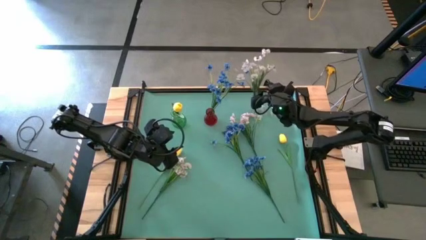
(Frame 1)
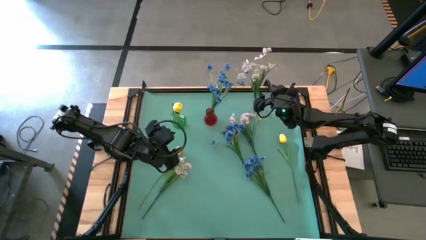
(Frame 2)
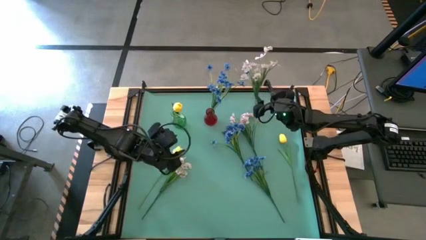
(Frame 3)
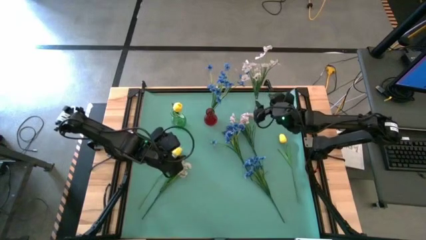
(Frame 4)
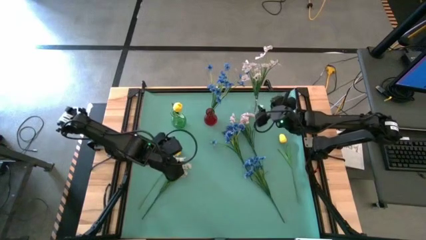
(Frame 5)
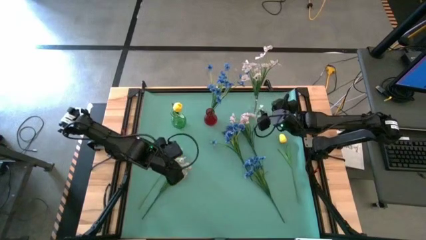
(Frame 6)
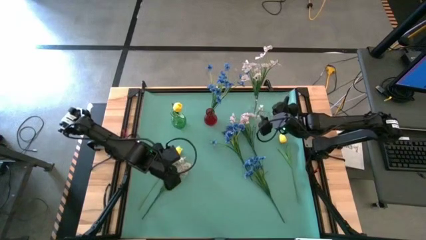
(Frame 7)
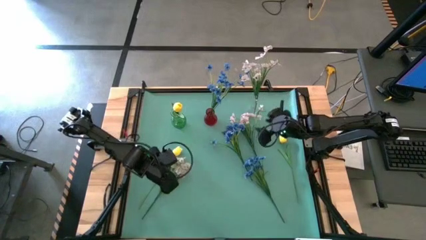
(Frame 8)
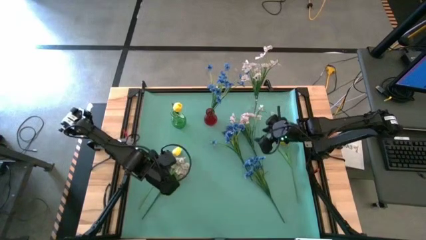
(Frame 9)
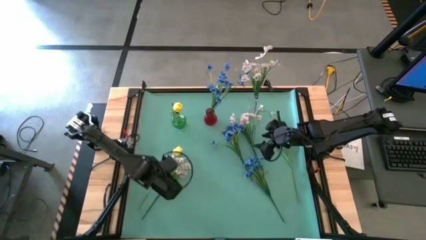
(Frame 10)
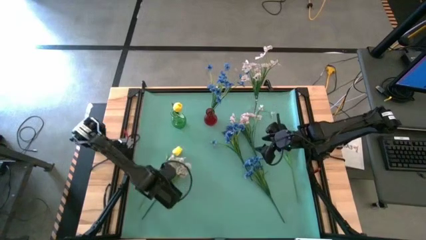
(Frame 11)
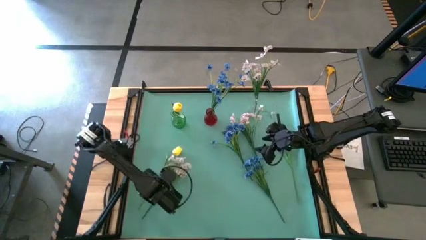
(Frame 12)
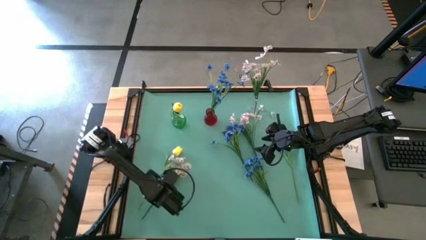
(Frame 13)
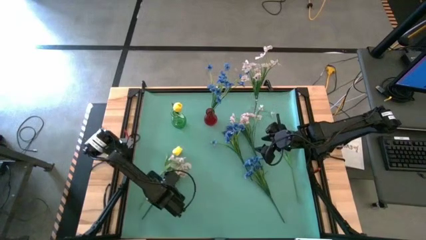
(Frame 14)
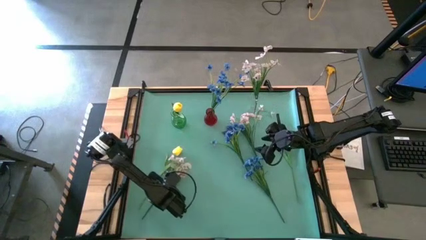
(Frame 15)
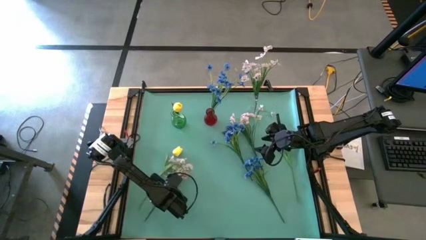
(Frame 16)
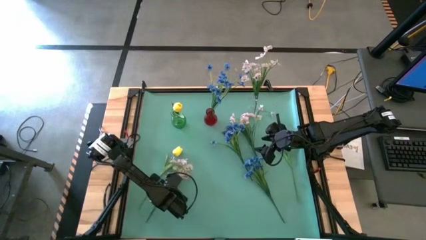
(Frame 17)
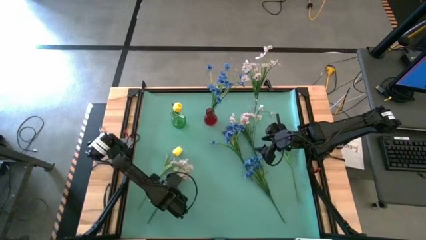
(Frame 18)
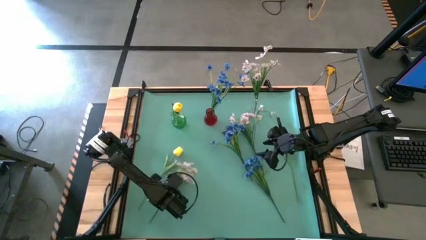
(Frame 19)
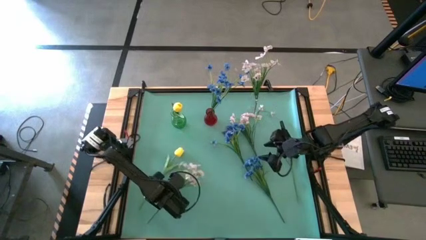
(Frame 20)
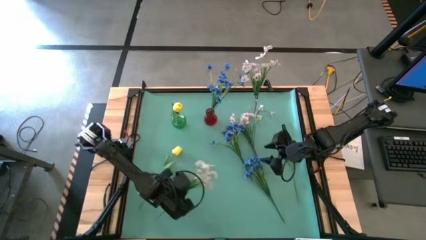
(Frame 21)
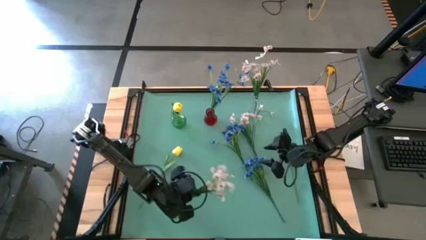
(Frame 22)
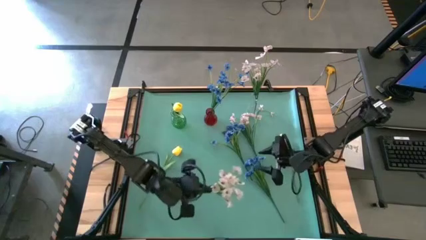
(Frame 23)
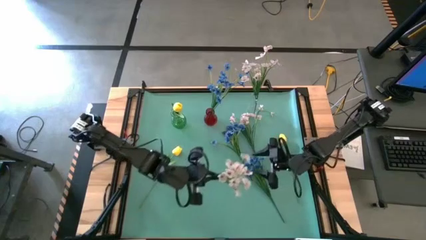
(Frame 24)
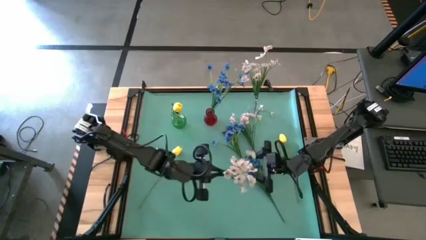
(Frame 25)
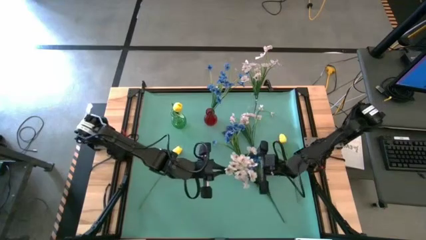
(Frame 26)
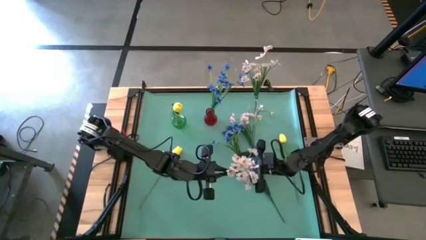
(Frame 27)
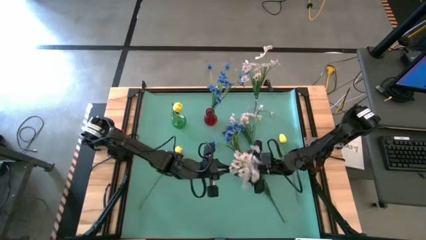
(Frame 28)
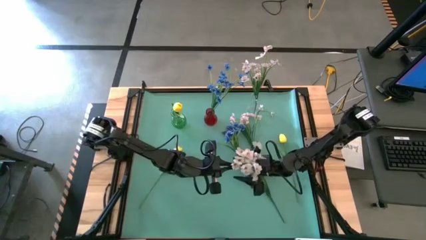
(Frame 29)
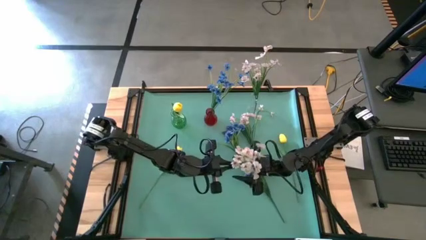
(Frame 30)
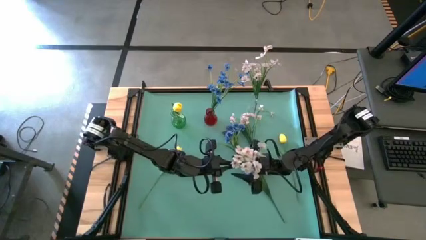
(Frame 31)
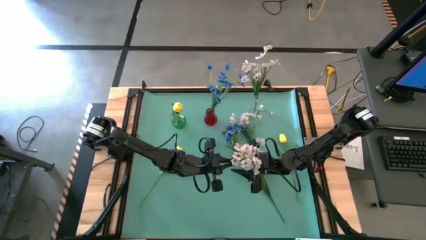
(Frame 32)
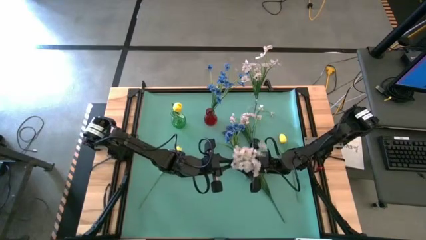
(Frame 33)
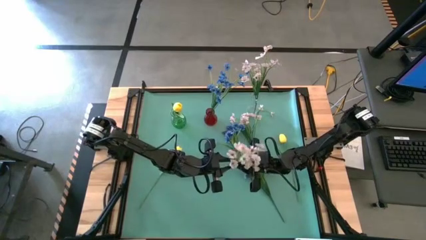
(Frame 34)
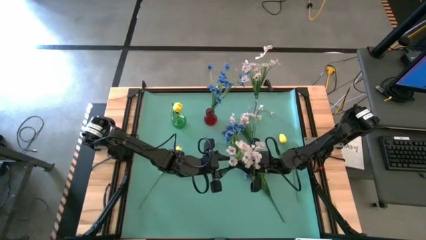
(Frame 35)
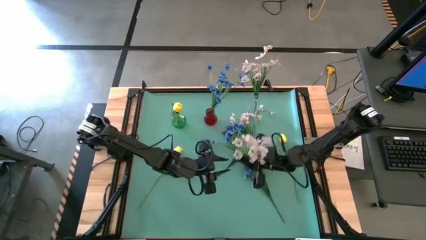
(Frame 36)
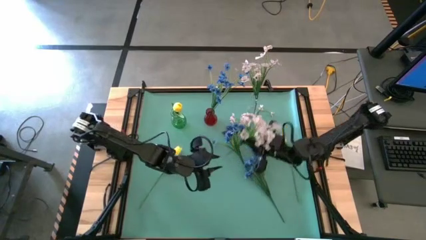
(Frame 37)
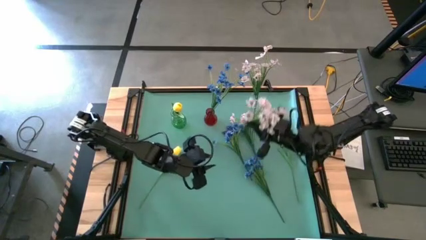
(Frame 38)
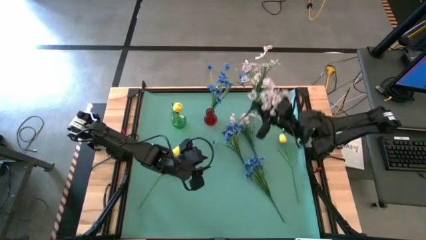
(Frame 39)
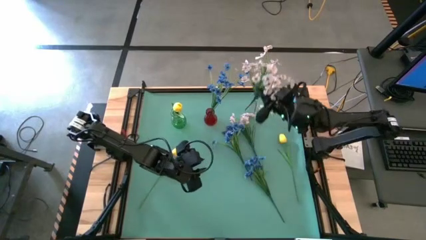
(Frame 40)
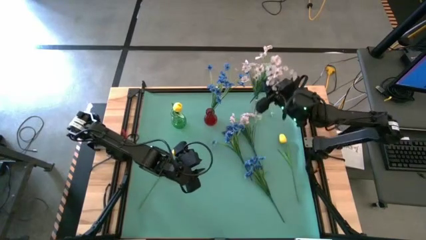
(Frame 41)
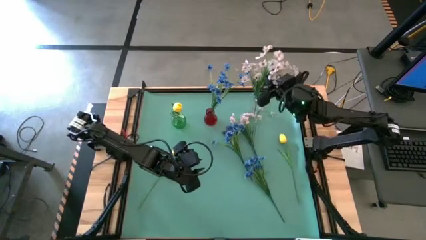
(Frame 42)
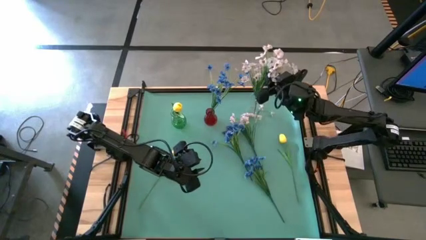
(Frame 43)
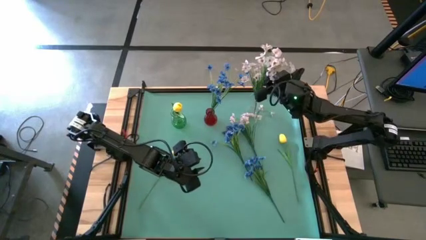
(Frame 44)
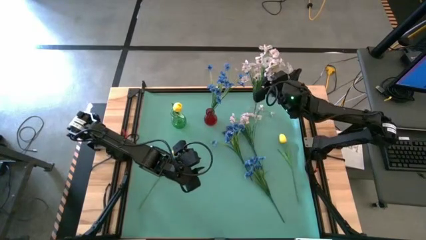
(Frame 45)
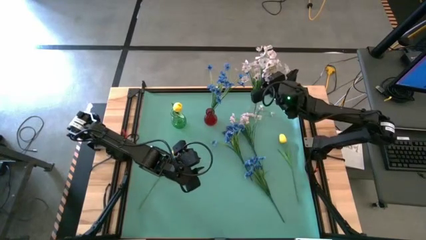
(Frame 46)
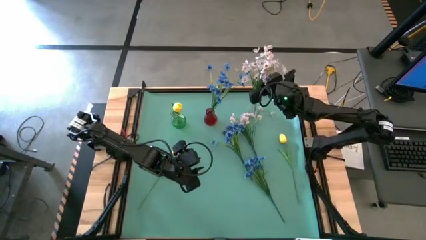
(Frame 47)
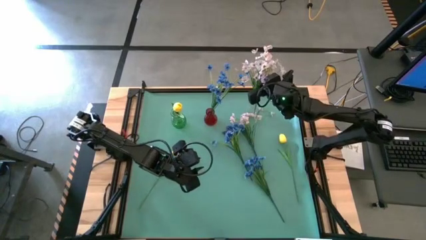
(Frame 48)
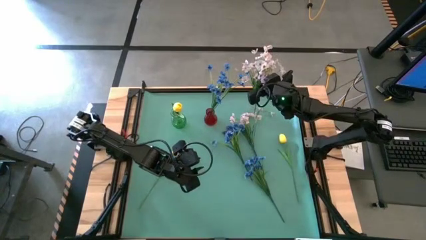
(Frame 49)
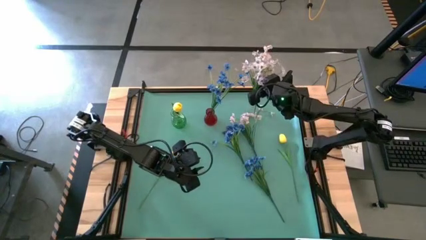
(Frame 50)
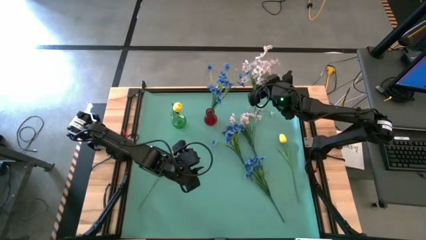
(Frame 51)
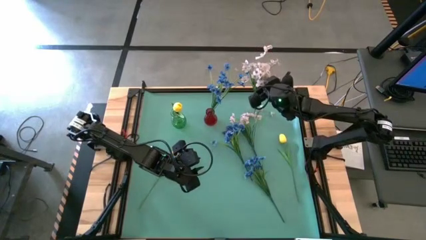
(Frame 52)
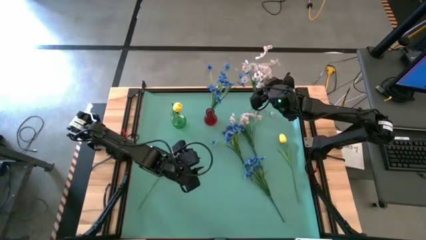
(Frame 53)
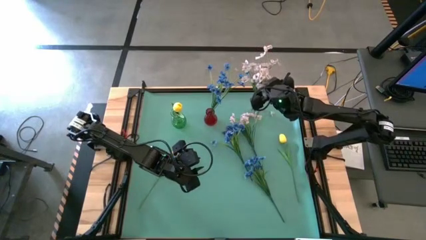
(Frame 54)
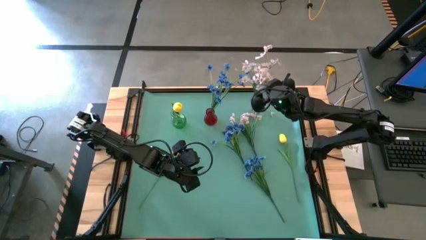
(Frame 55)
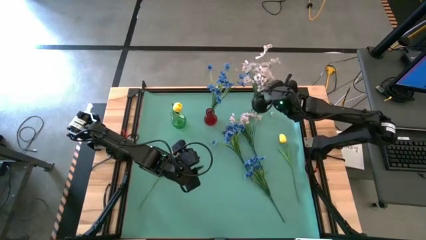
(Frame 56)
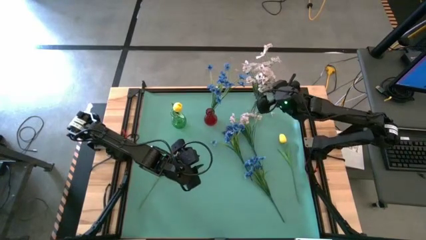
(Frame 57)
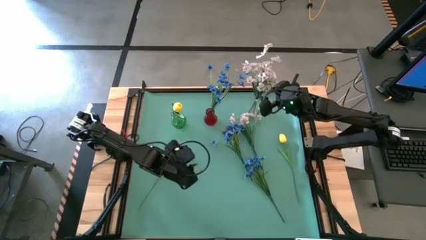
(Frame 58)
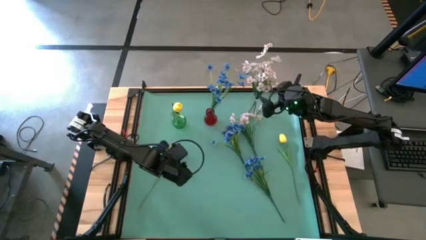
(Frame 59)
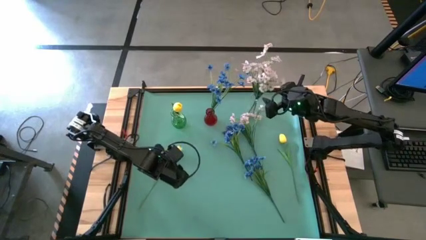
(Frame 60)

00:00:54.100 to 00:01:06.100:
Task: Sort flowers into vase by color
Put the left white flower into the transparent vase

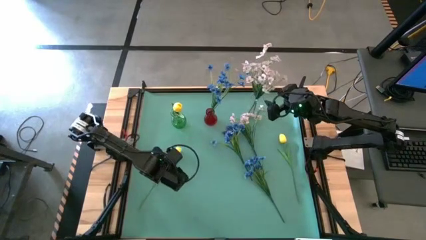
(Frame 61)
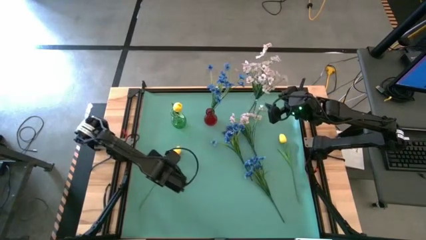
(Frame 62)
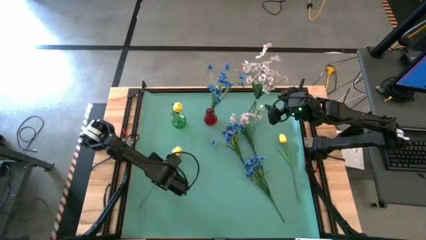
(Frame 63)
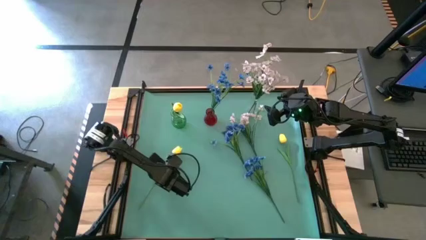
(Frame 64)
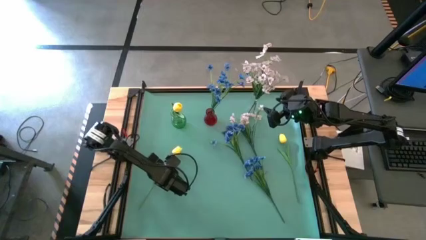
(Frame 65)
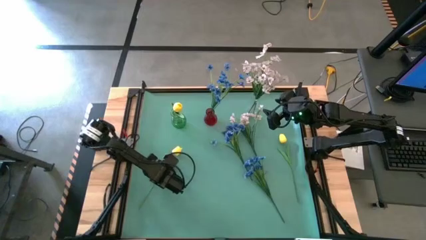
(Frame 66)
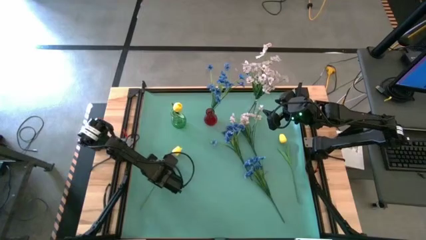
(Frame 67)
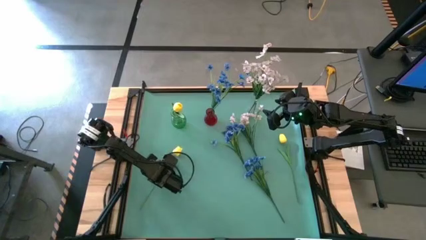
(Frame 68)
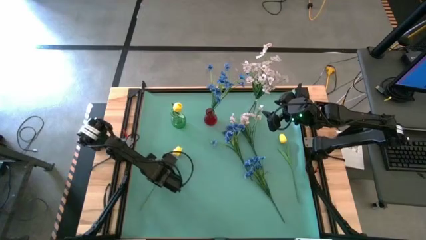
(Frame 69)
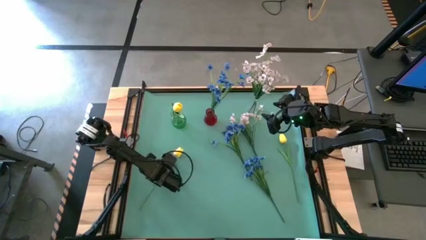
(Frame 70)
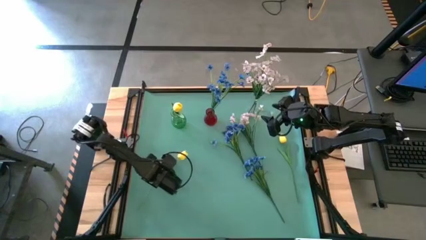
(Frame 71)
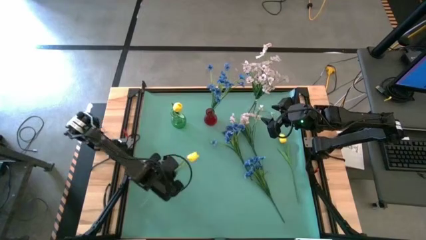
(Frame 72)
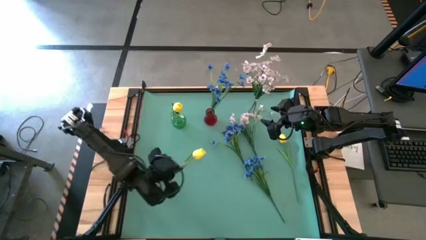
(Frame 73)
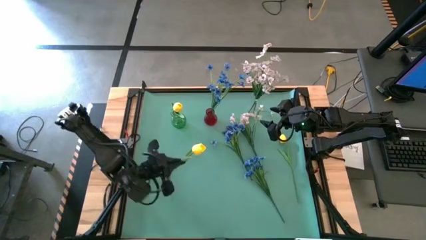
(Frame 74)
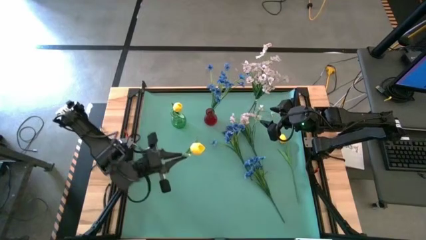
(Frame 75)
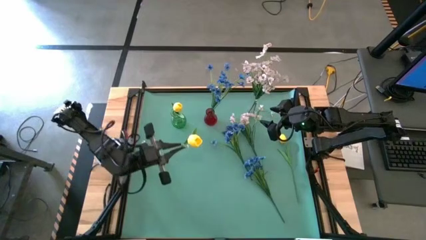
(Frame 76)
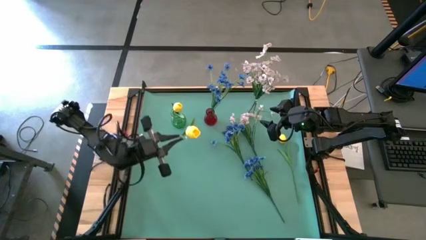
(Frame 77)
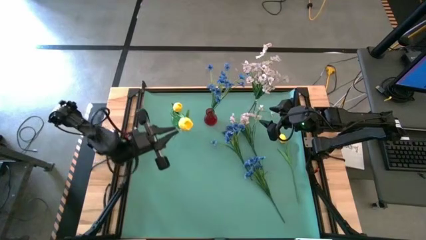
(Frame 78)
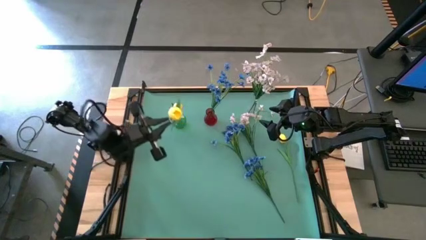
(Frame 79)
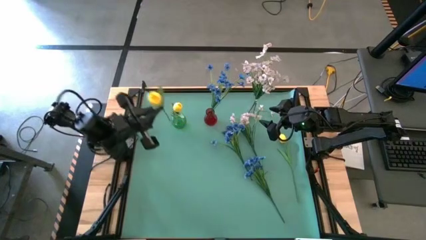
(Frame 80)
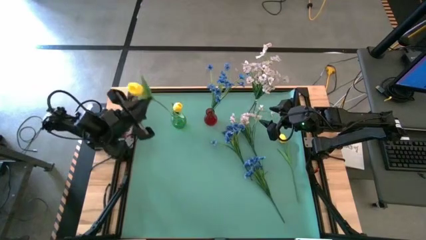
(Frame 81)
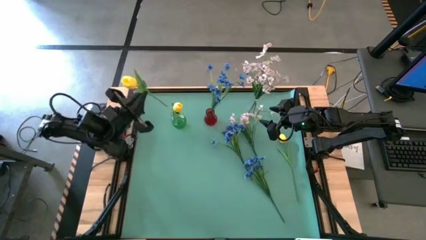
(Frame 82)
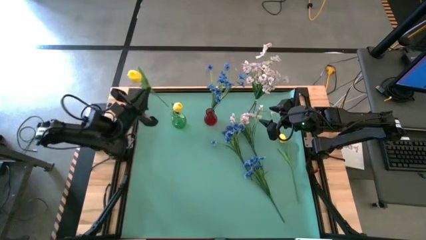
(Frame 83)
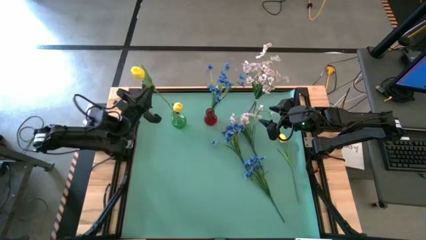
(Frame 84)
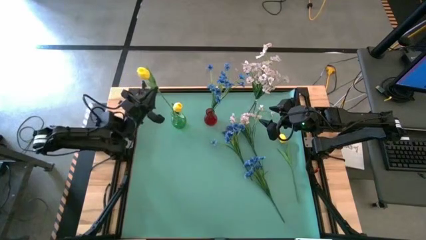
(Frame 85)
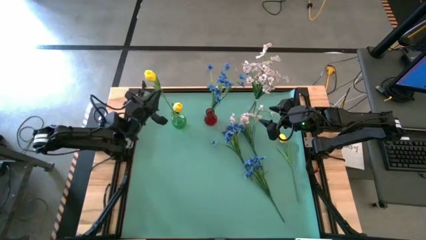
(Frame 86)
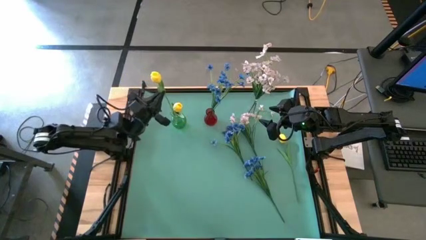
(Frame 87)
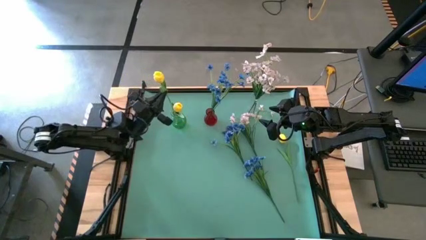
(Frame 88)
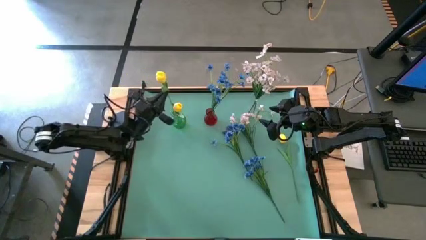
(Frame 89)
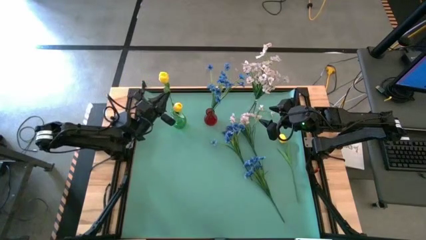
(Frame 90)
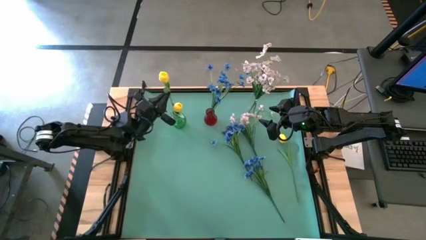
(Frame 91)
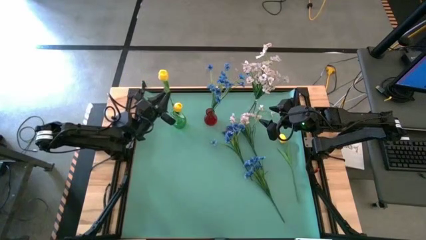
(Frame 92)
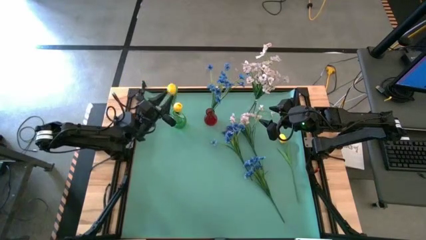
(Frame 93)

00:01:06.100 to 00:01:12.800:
Put the left yellow flower into the green vase
